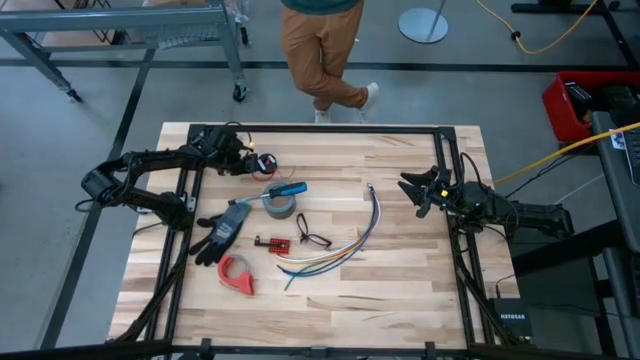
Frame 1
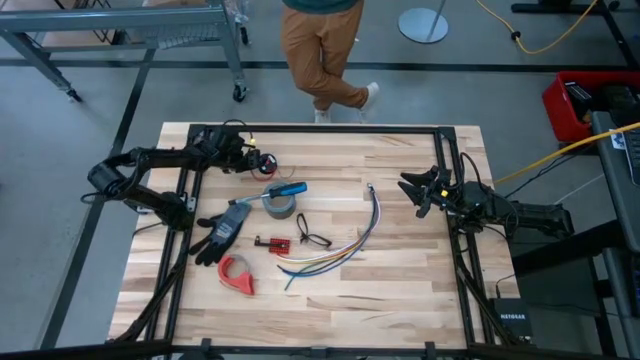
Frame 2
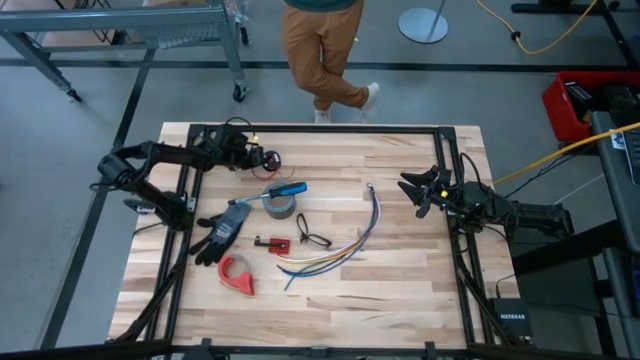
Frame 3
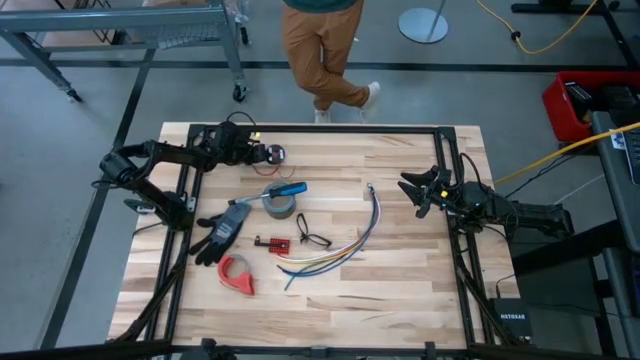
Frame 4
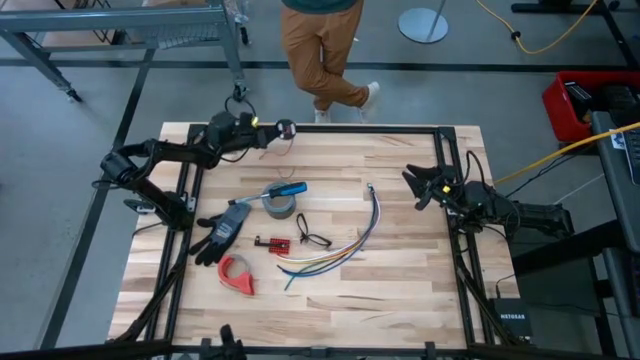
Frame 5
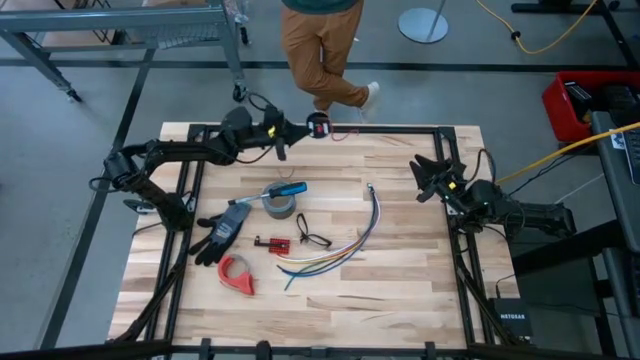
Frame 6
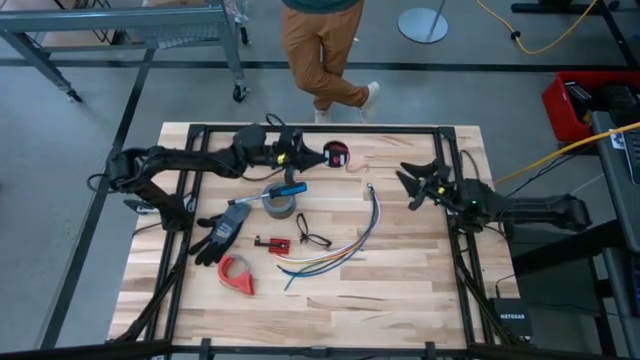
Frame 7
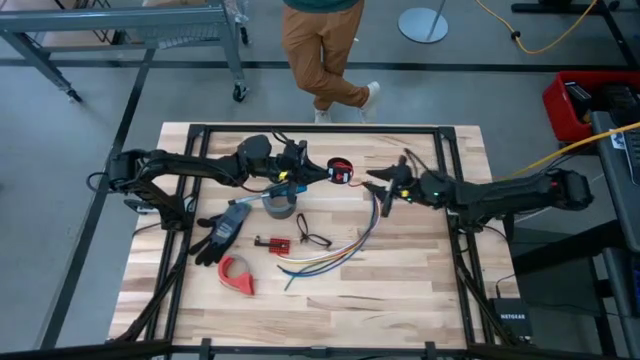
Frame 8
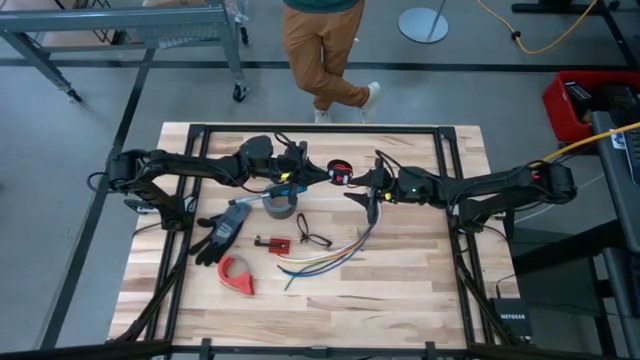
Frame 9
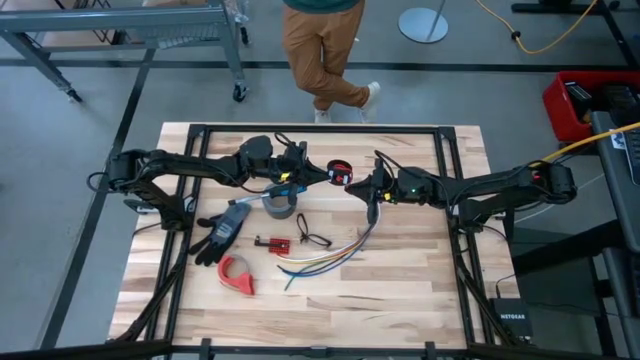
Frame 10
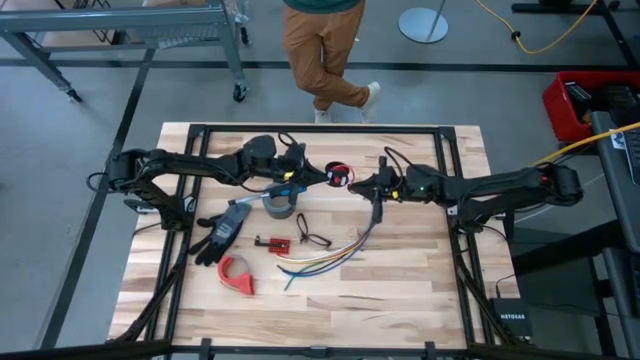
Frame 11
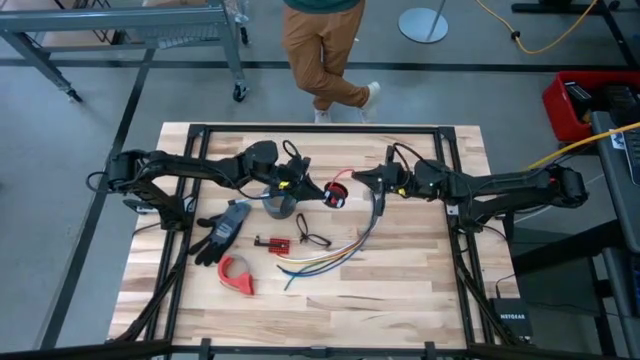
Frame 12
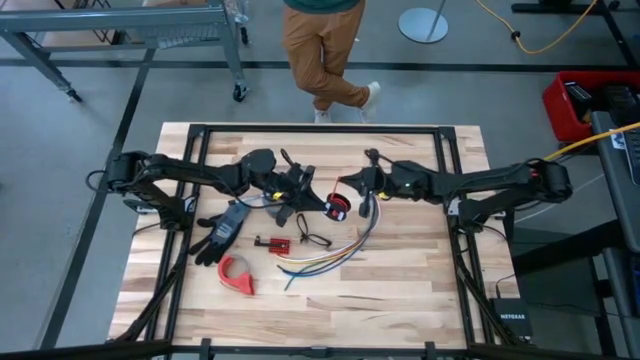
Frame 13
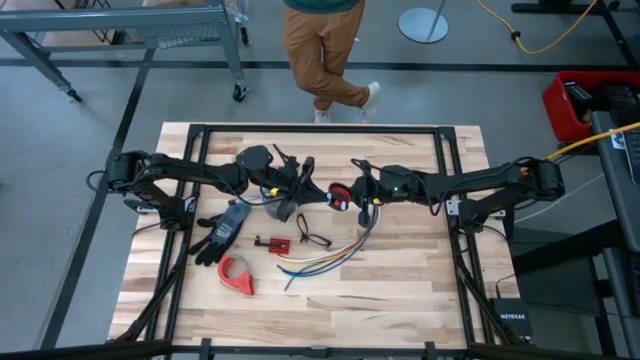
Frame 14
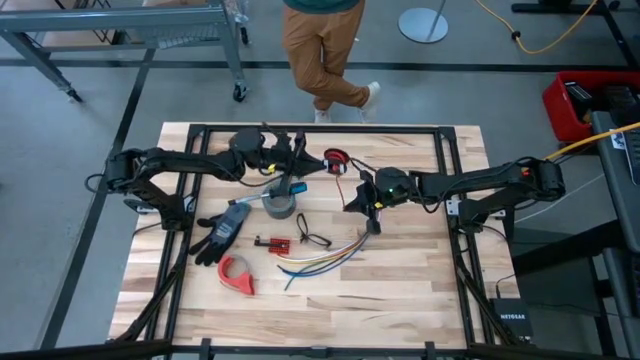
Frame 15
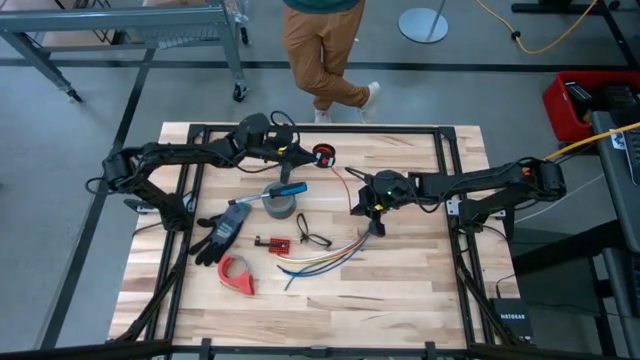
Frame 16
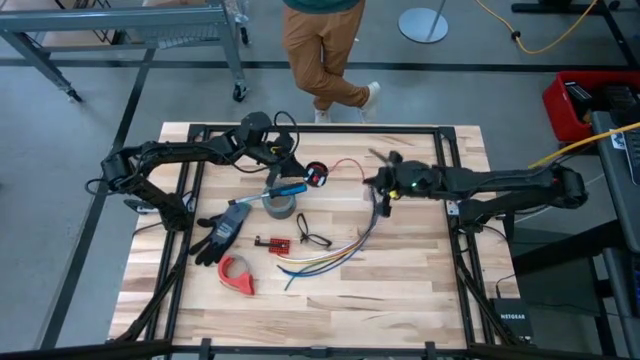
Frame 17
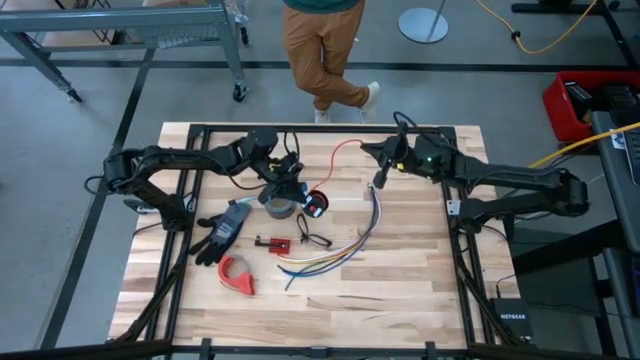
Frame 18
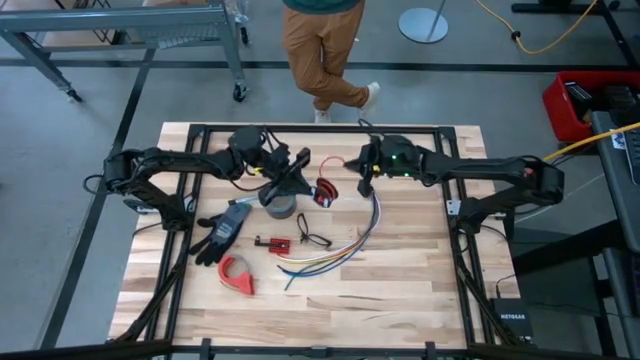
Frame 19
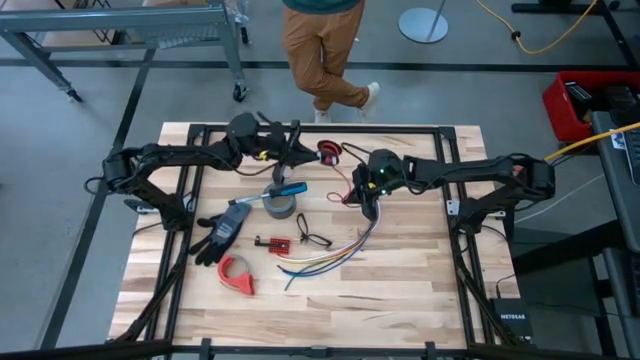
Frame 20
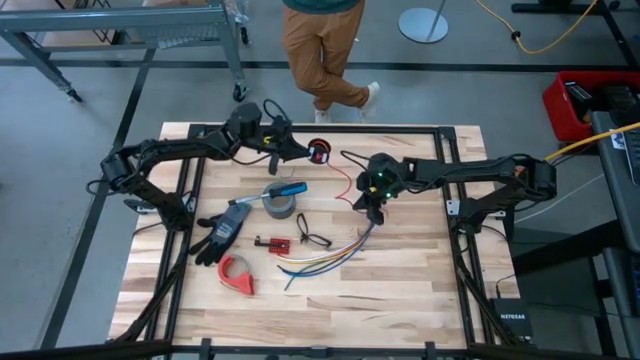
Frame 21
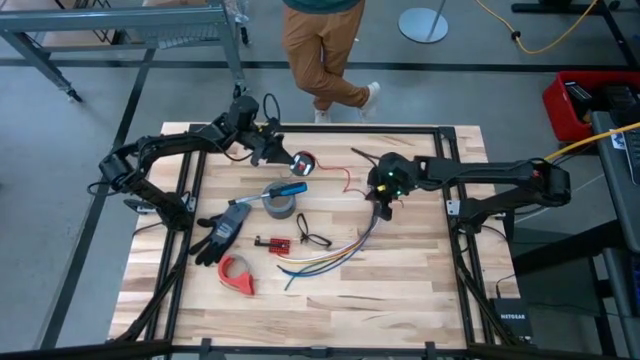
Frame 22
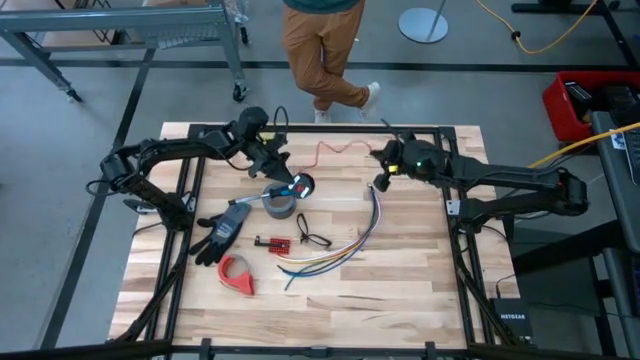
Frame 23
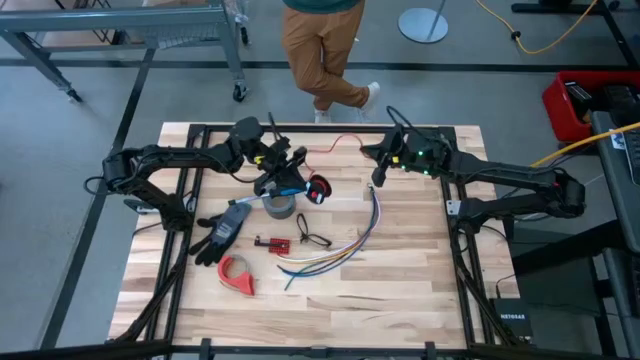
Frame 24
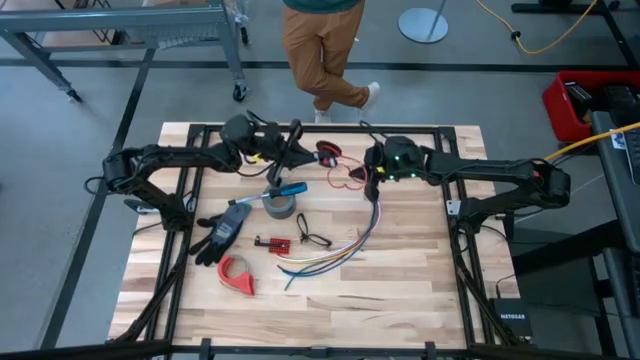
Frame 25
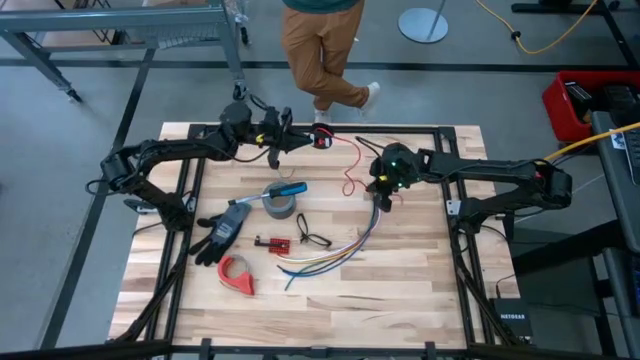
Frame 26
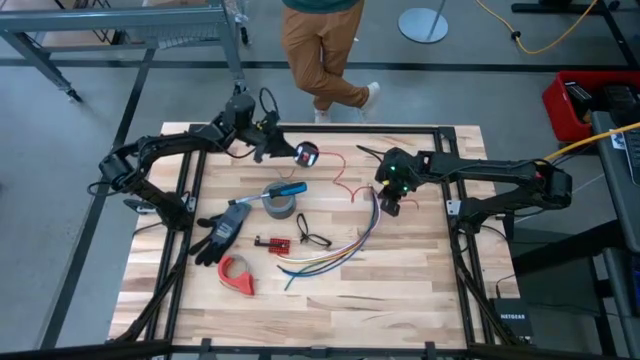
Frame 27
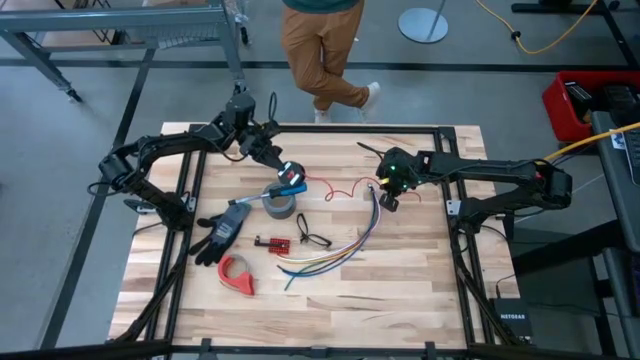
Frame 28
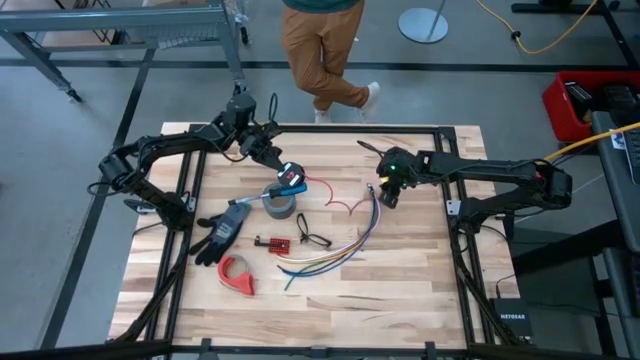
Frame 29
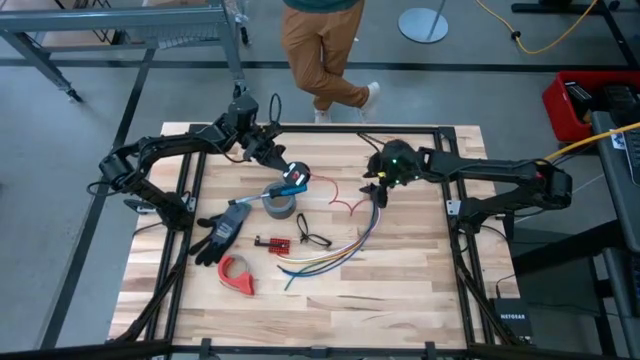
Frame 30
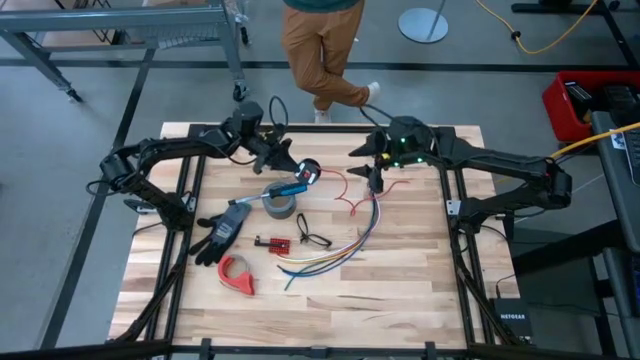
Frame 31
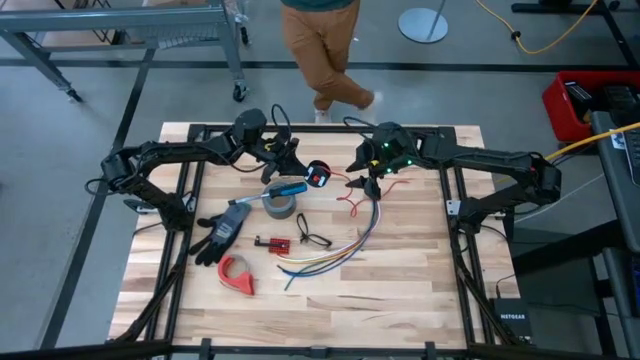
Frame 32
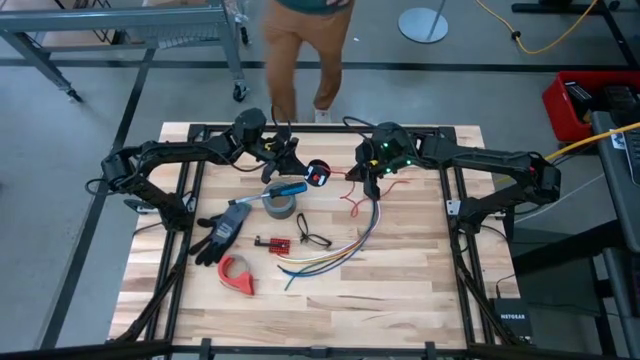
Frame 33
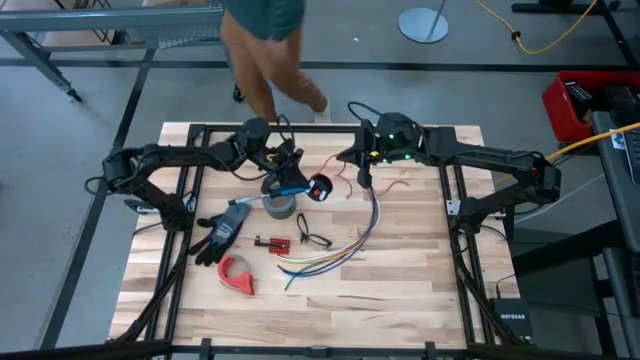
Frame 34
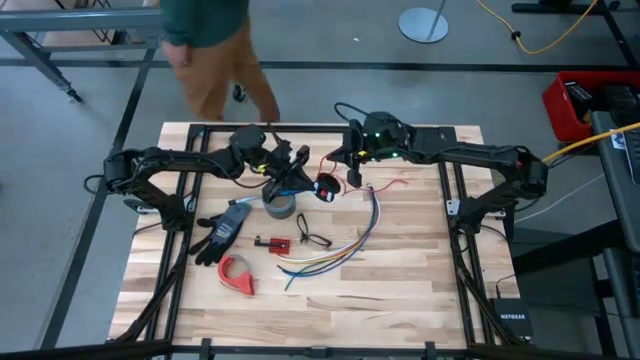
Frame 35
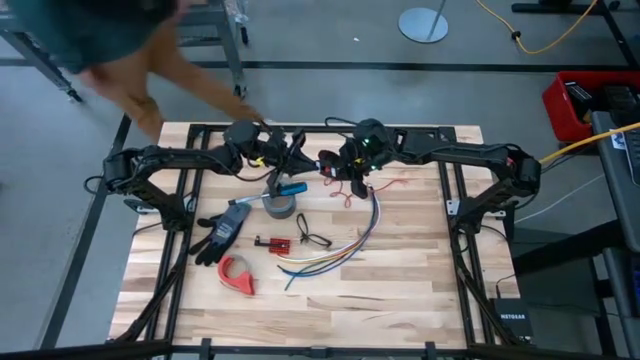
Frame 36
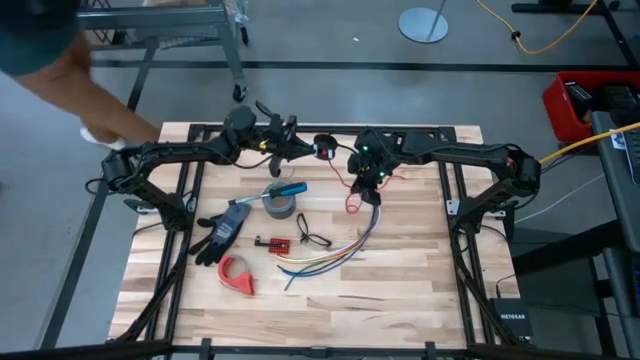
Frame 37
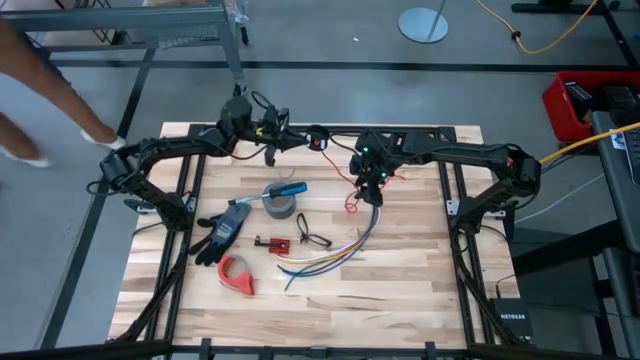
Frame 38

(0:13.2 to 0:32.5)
Task: Coil cords
Uncoil the red wire from the spool
